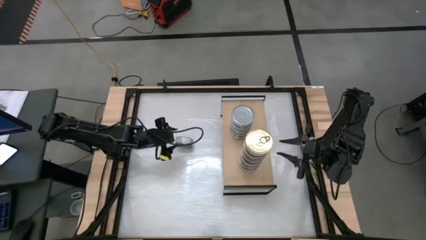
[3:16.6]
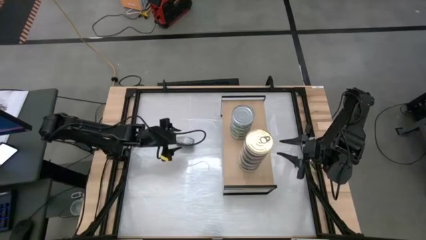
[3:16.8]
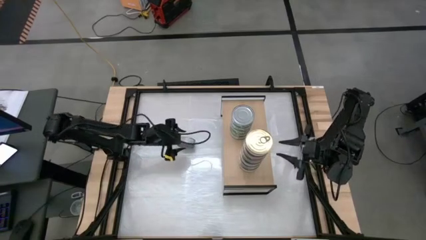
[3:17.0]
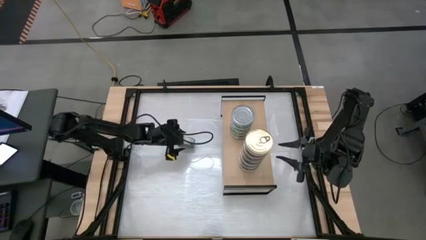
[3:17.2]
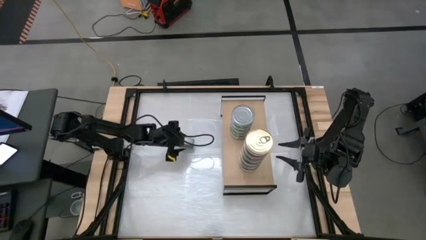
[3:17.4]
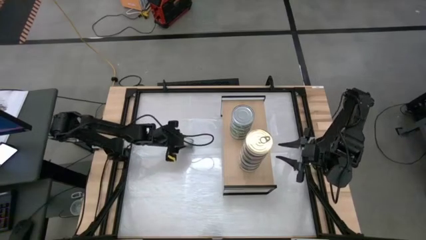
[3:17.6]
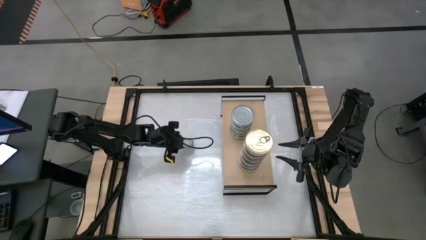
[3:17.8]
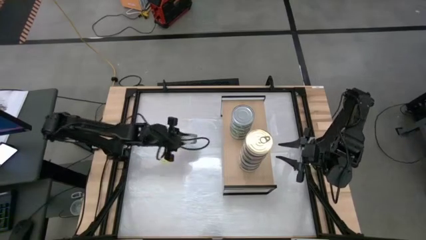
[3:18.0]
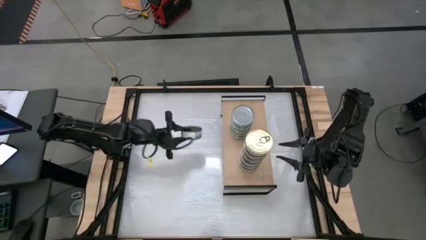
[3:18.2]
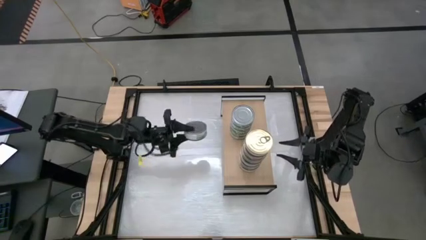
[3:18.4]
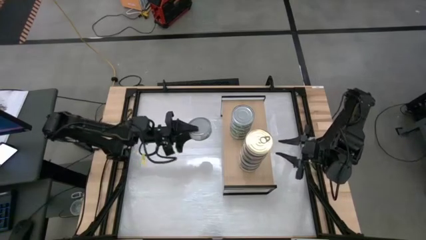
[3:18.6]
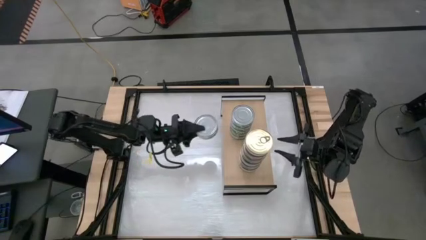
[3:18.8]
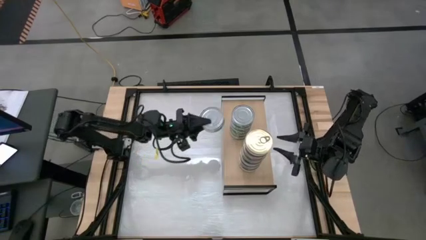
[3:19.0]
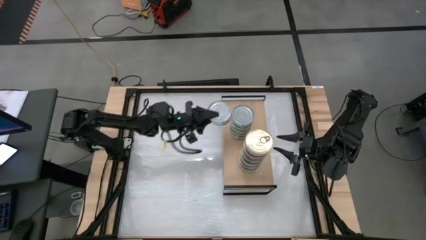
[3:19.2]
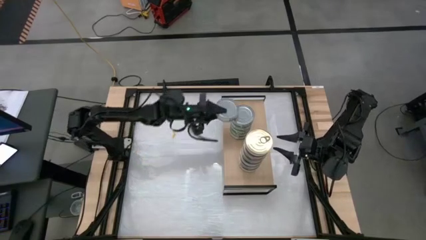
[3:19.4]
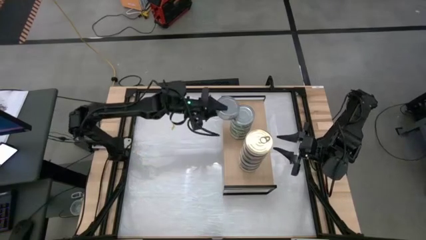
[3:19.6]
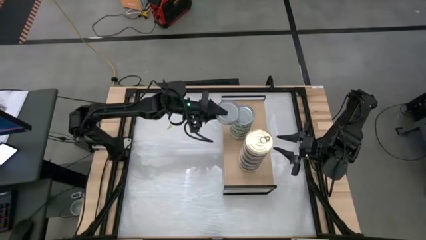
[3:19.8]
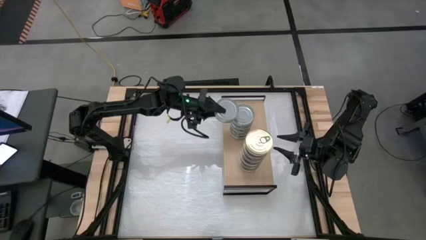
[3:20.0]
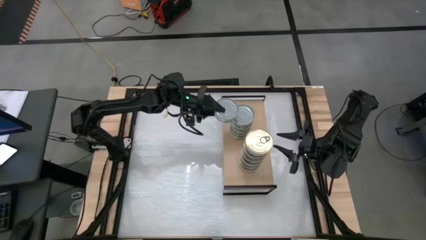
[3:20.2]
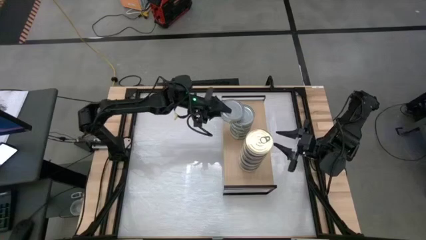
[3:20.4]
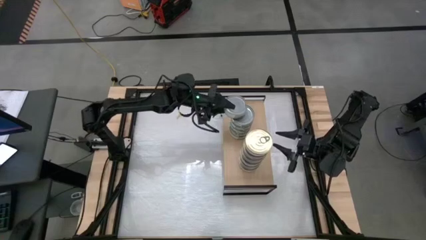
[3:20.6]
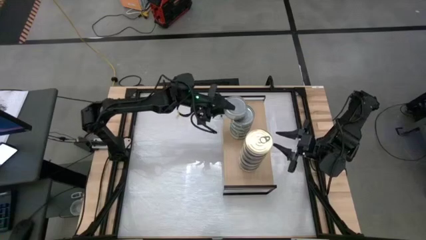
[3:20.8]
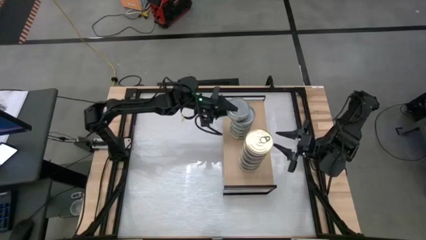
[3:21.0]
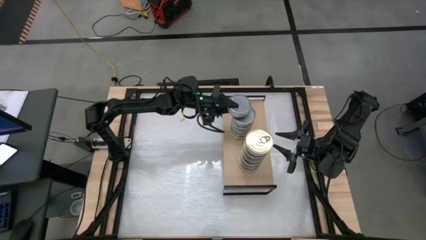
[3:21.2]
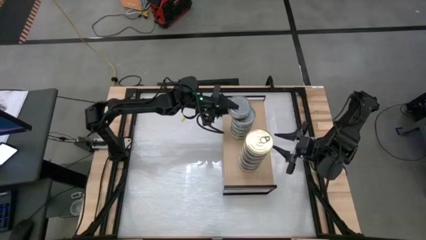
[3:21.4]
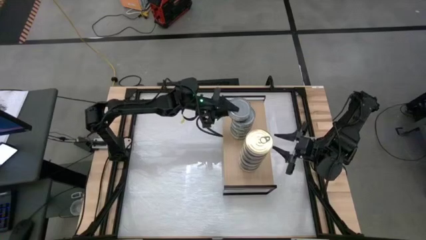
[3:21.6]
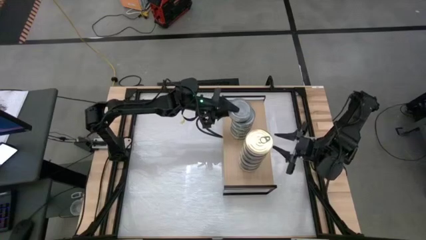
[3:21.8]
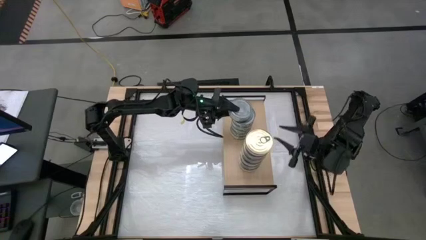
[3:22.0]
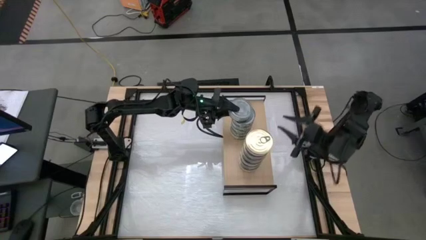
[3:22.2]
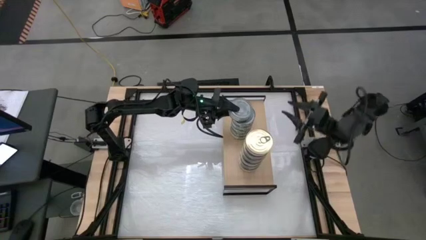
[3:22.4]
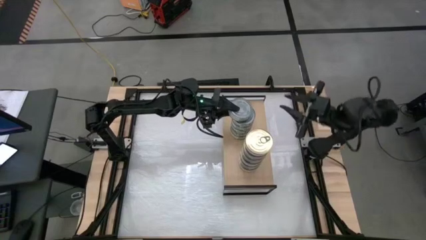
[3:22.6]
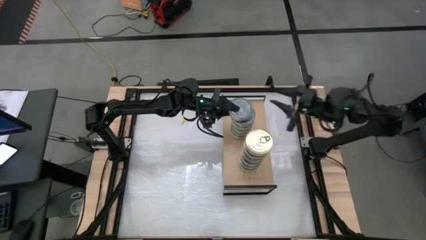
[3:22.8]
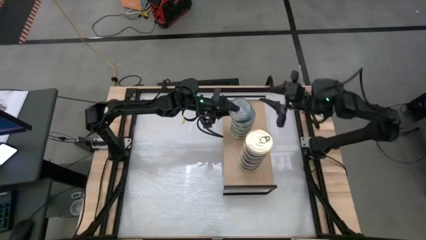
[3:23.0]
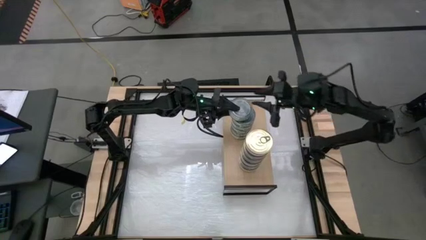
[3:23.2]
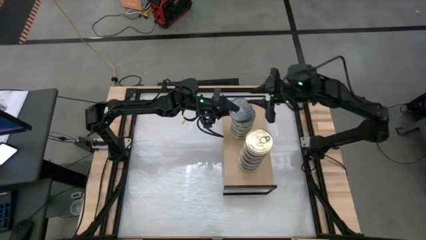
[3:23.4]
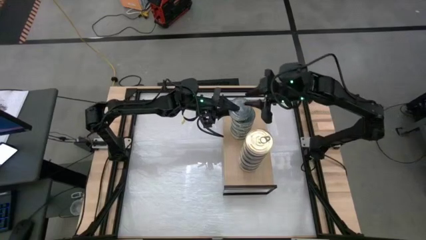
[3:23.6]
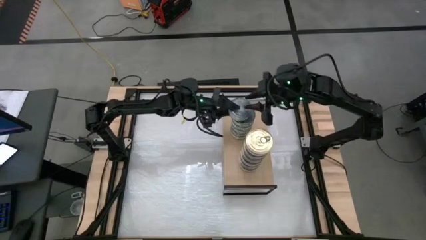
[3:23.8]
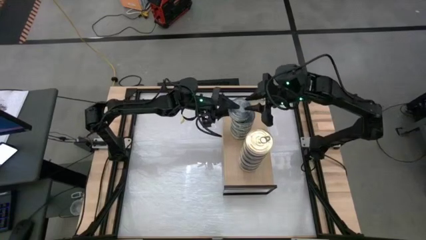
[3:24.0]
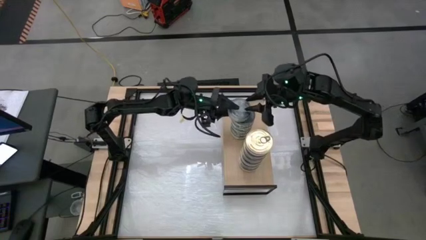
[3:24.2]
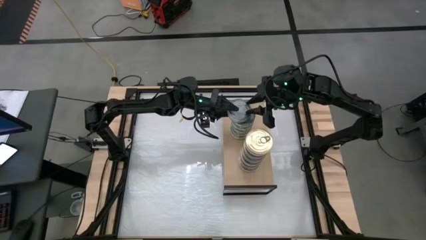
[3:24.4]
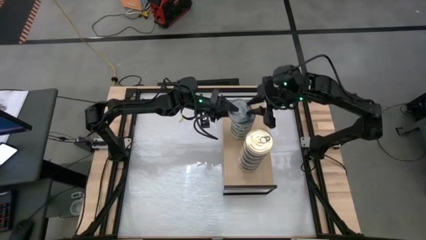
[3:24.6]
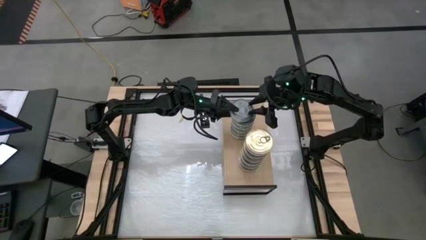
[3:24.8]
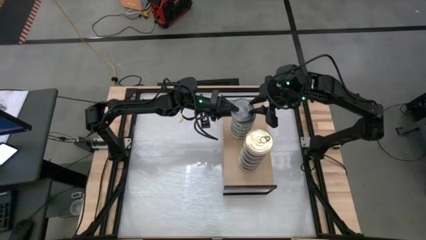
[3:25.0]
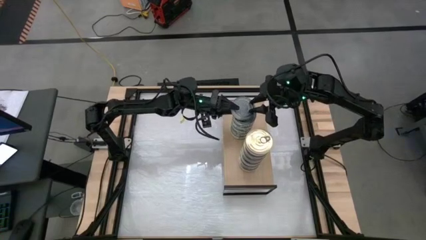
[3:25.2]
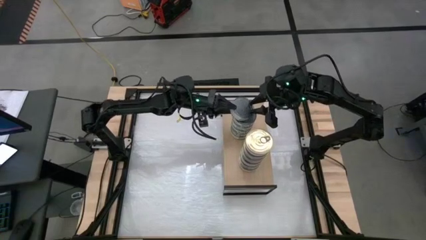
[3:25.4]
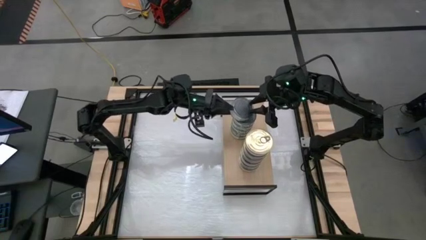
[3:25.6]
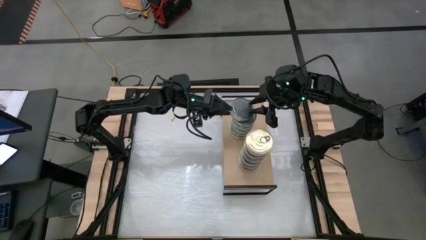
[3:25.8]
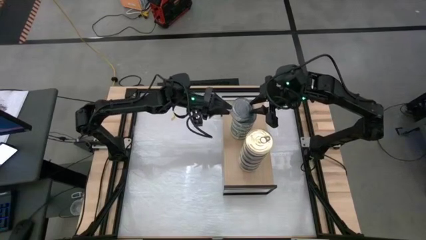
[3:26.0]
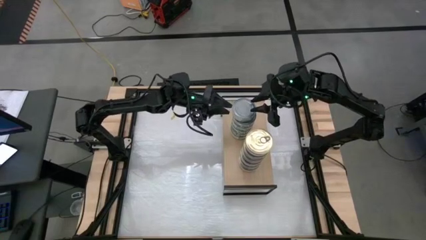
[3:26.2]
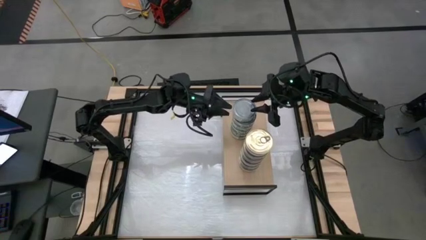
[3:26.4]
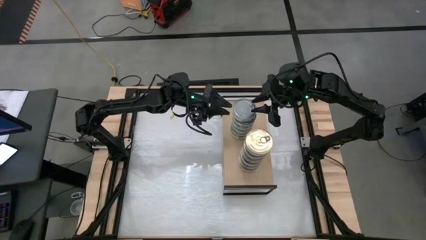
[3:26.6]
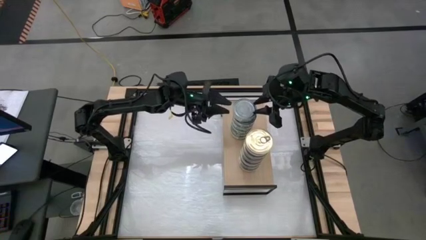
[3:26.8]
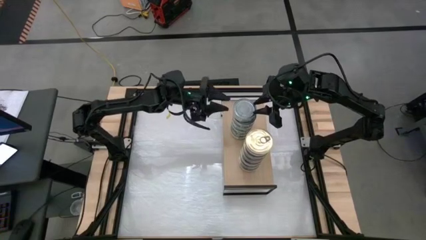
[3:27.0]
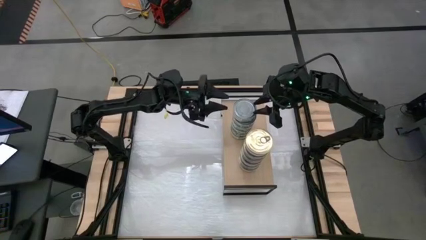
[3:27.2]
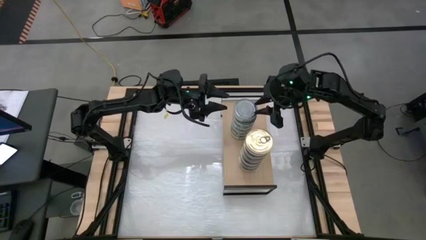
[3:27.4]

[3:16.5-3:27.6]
Task: Stack canned seafood by type on shelf
Stack the green tuna can on top of the green tuna can

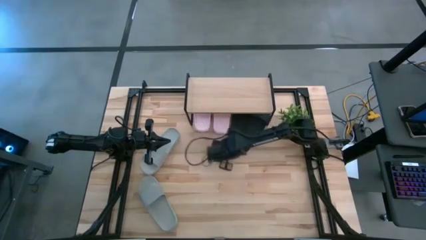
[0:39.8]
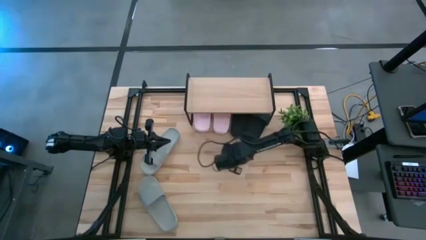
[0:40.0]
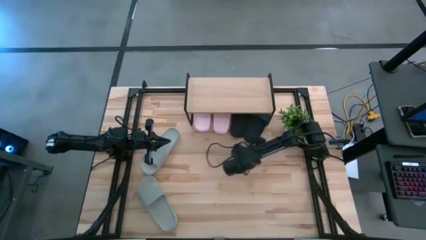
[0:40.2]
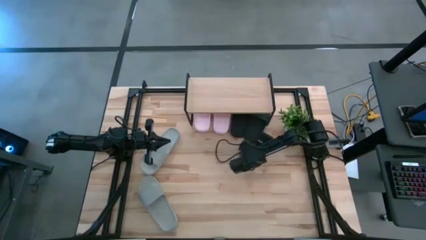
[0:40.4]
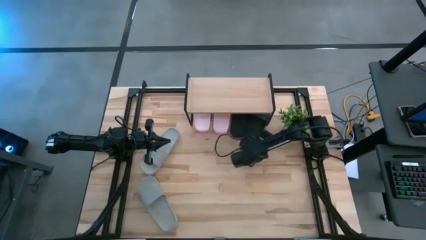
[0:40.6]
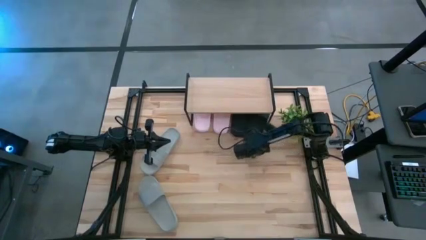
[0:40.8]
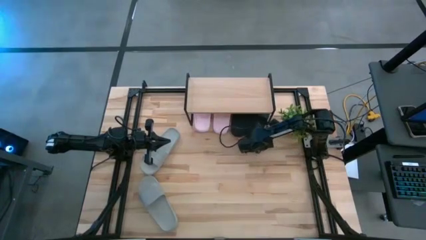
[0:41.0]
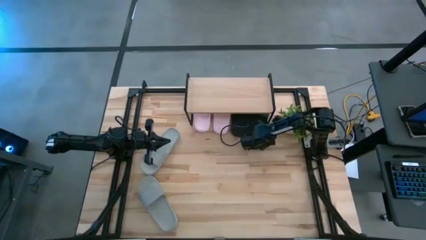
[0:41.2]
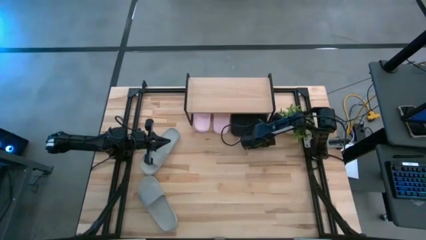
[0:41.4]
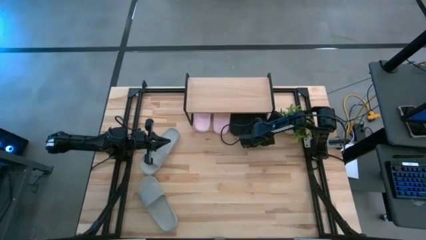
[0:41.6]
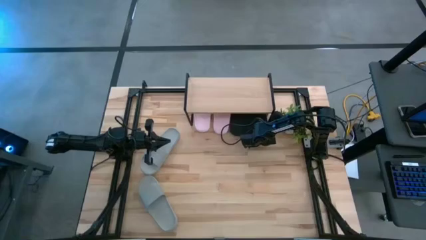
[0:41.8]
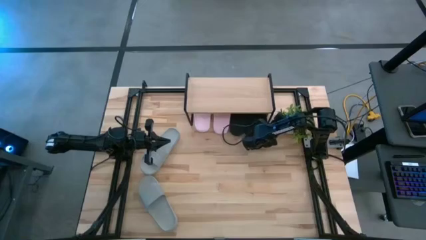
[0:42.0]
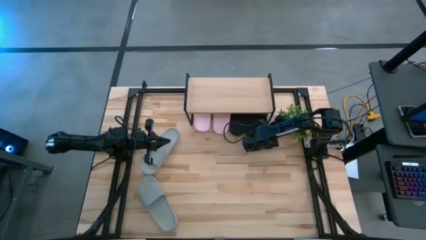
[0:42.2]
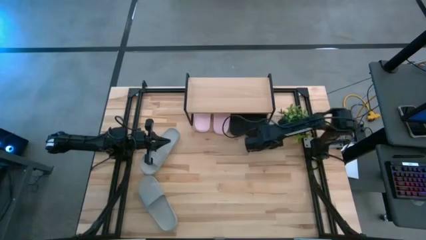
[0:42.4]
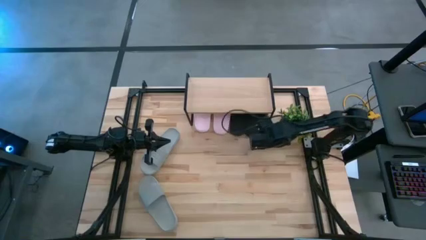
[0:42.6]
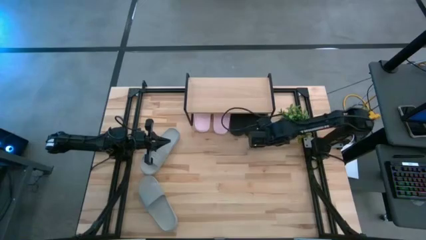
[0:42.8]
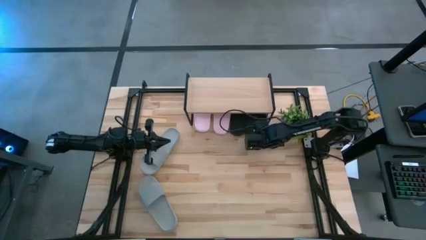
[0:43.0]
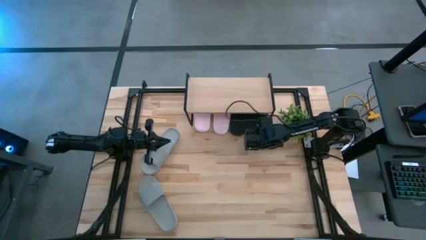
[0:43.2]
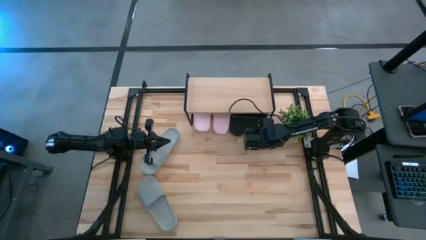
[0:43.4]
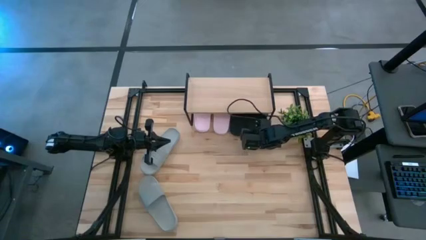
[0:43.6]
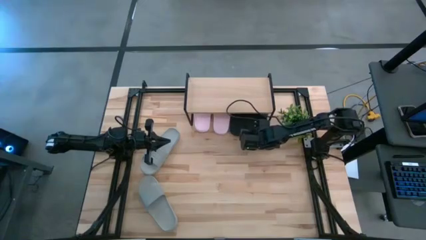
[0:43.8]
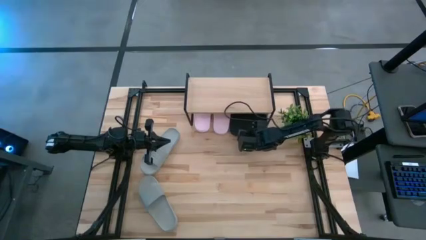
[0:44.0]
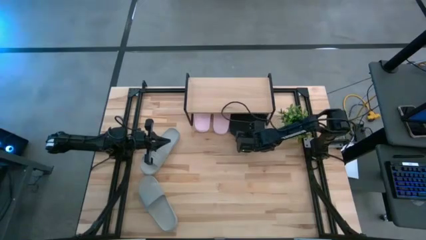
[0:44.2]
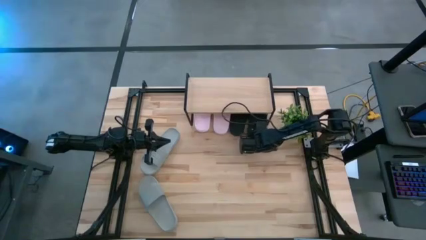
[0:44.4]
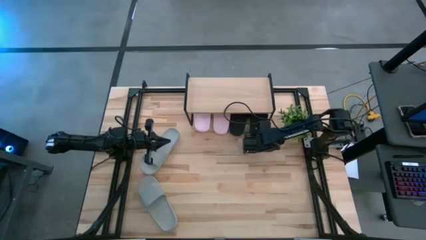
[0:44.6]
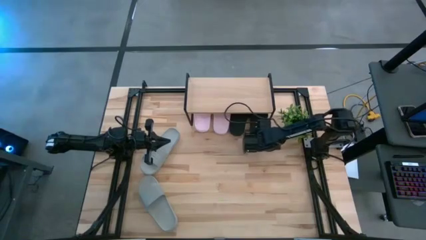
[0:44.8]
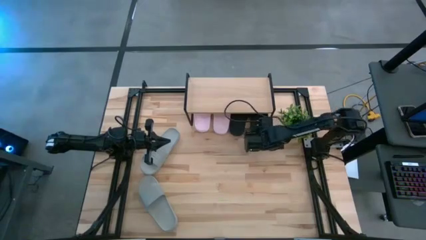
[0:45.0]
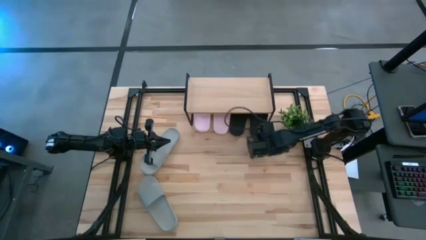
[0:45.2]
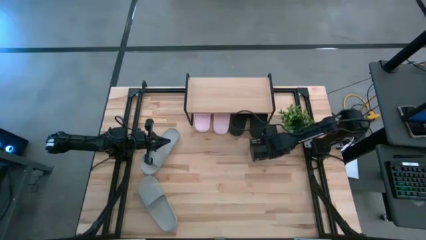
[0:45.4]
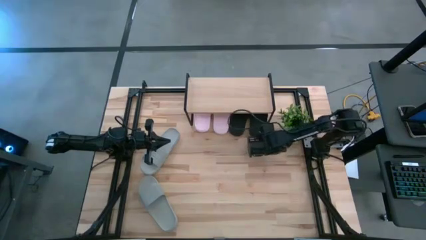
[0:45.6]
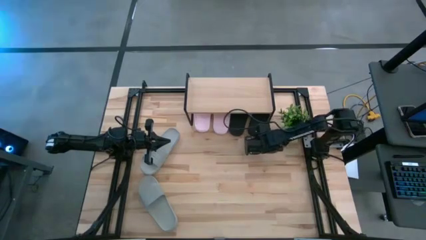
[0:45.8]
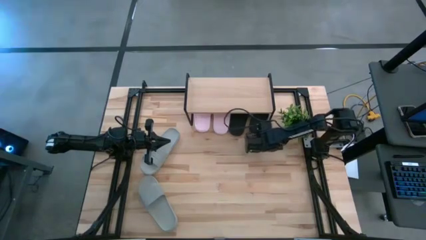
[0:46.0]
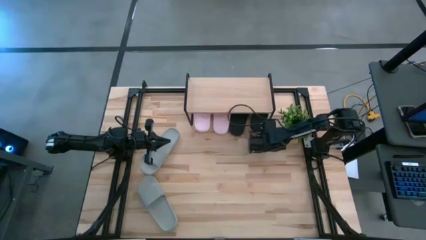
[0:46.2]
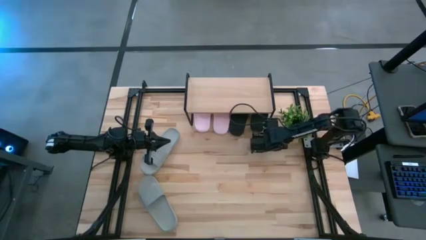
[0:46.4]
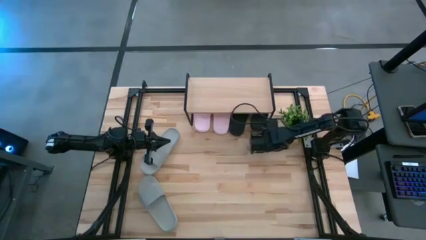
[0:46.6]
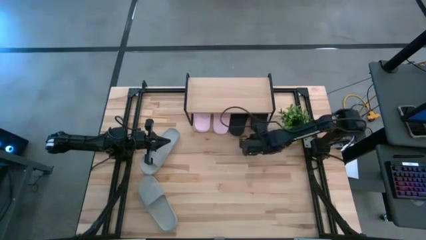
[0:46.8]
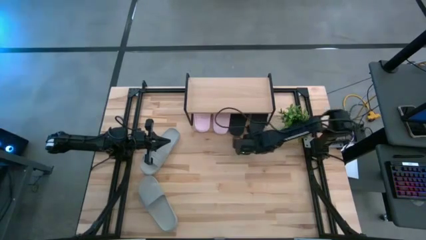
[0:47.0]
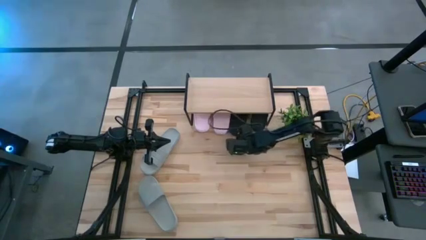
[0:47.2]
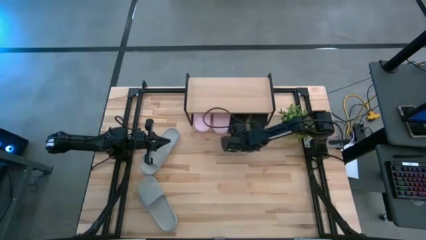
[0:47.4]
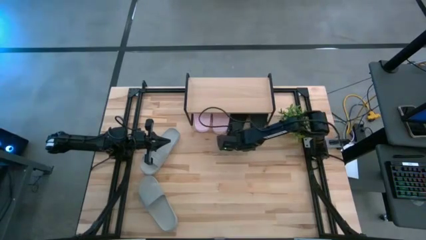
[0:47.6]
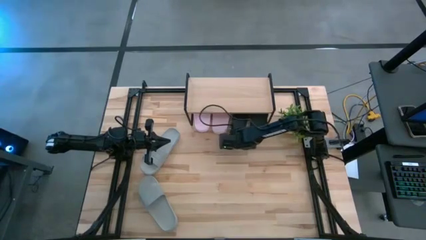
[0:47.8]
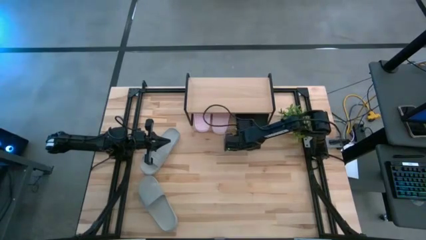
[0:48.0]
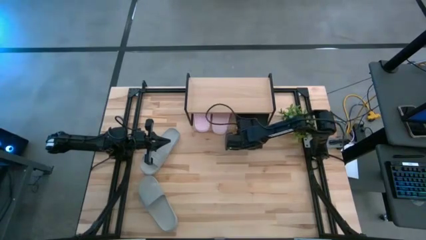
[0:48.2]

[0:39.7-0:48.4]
Task: Pick and place slides into the shelf
Adjust the black slides under the shelf
